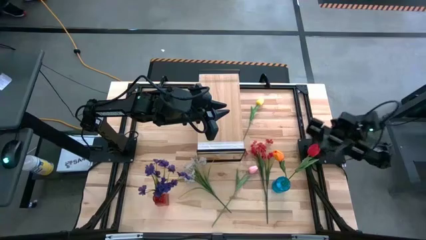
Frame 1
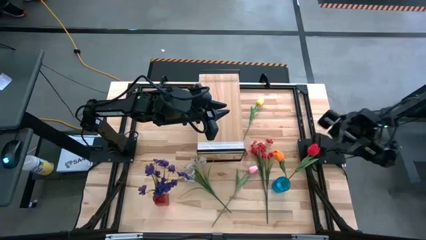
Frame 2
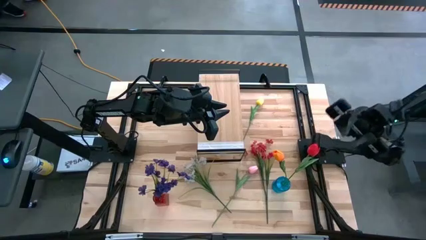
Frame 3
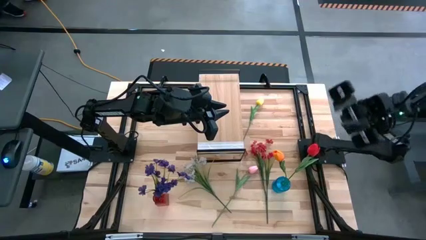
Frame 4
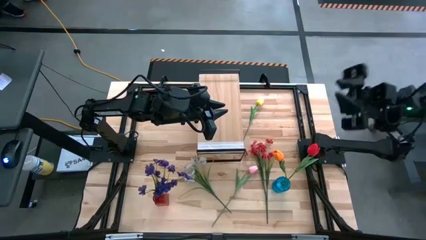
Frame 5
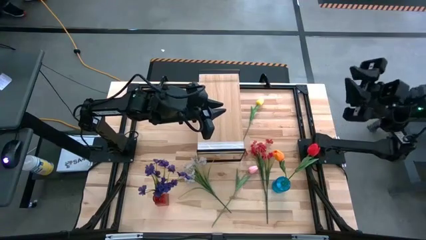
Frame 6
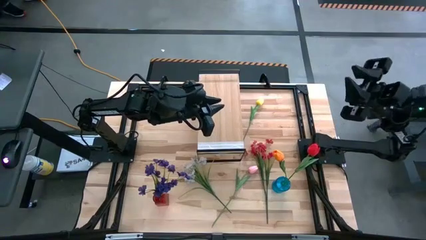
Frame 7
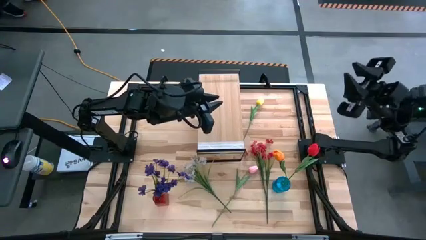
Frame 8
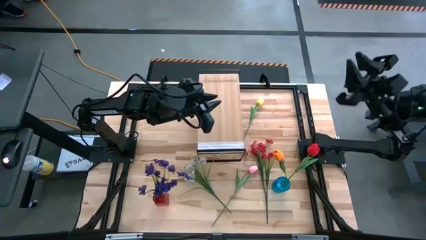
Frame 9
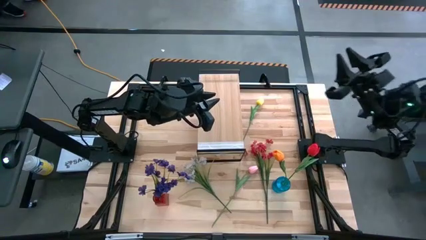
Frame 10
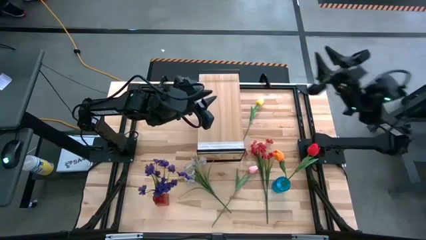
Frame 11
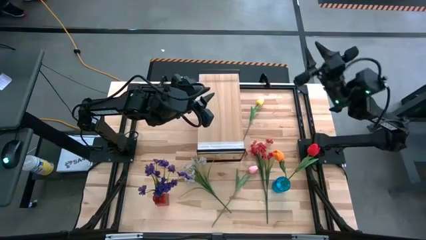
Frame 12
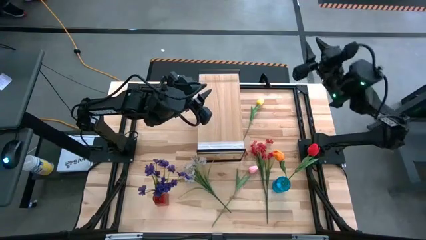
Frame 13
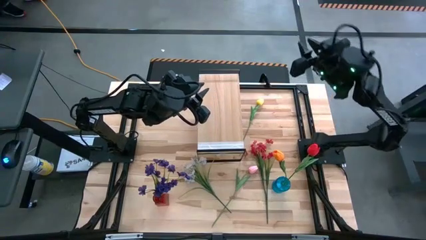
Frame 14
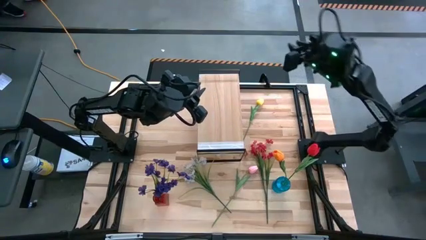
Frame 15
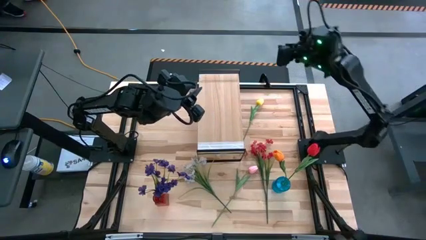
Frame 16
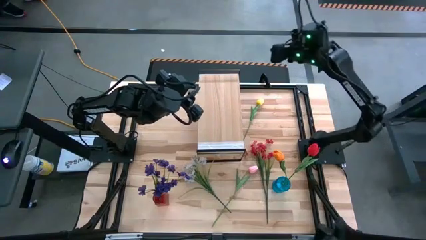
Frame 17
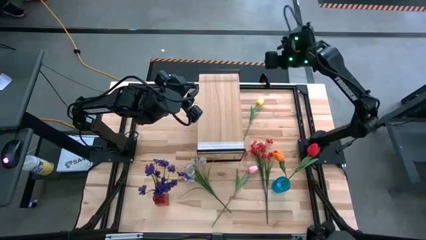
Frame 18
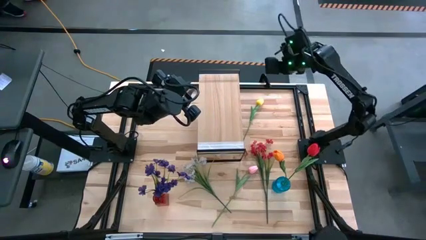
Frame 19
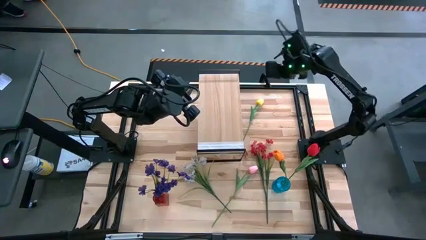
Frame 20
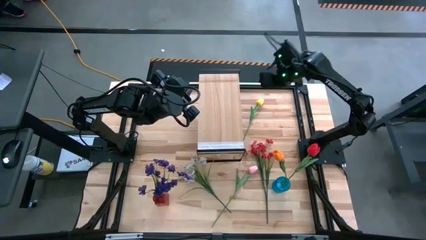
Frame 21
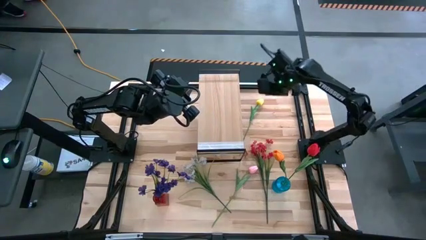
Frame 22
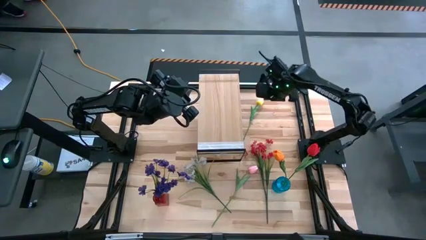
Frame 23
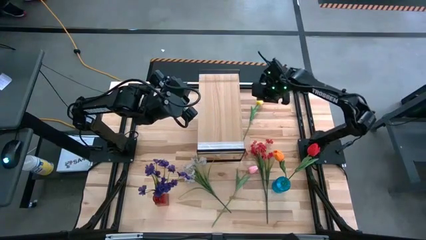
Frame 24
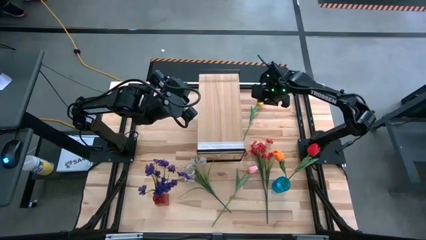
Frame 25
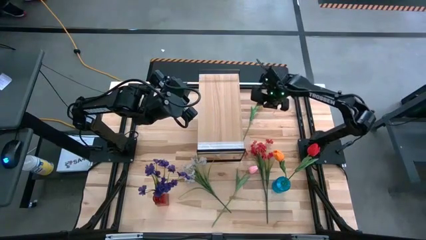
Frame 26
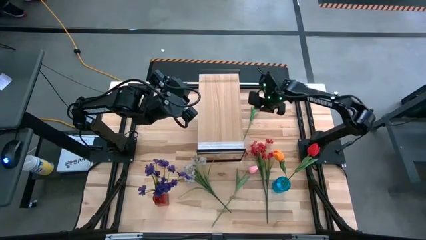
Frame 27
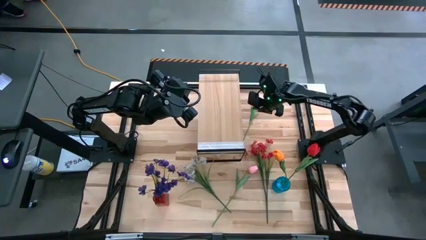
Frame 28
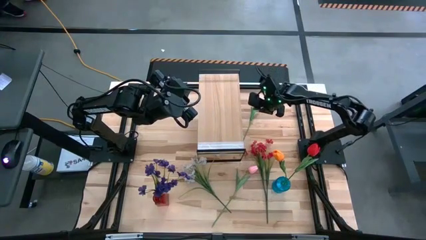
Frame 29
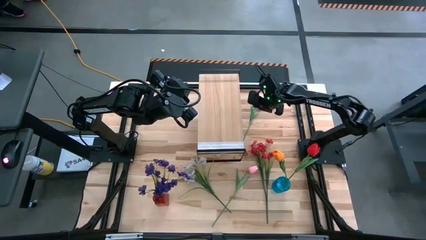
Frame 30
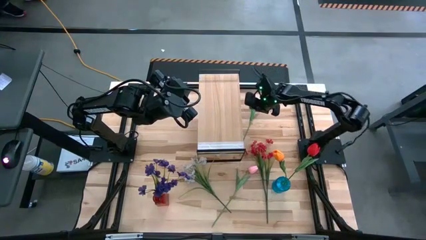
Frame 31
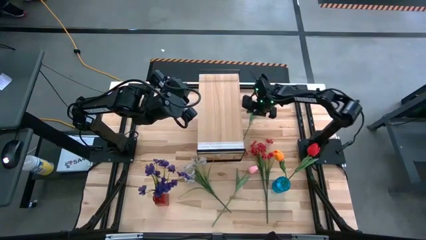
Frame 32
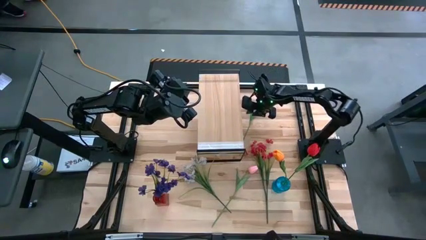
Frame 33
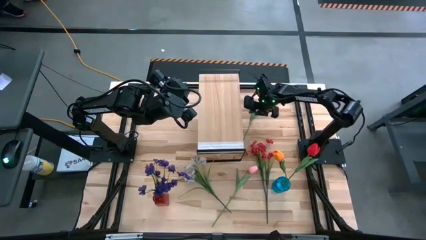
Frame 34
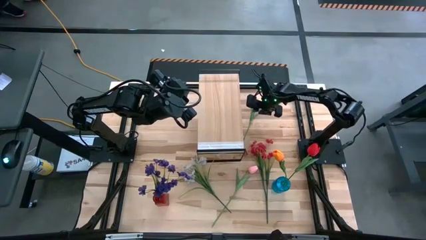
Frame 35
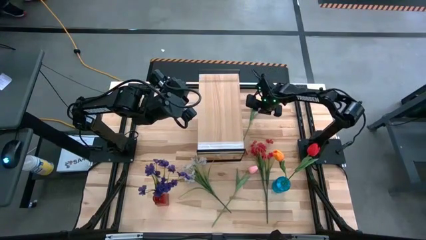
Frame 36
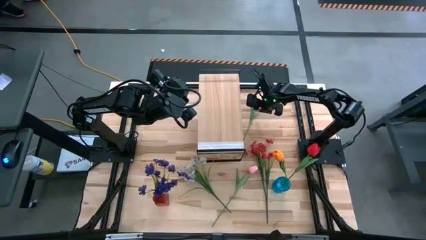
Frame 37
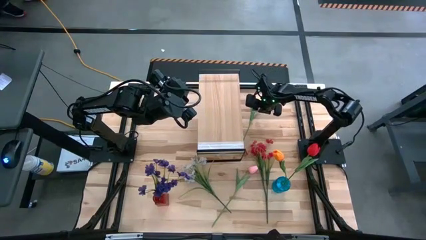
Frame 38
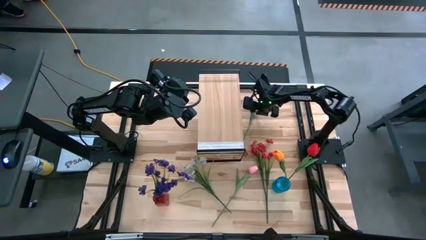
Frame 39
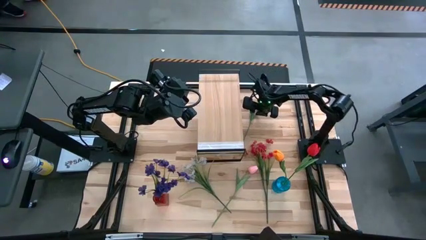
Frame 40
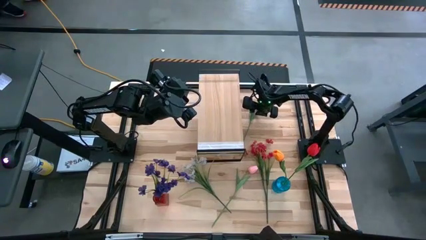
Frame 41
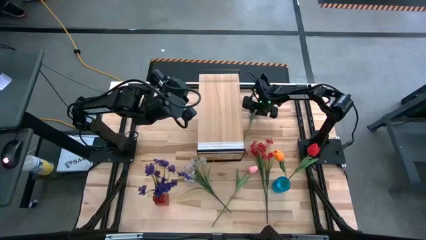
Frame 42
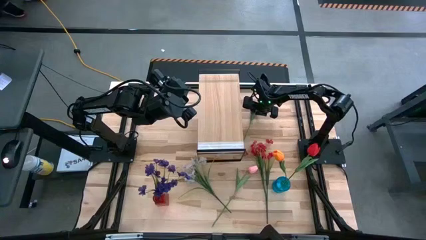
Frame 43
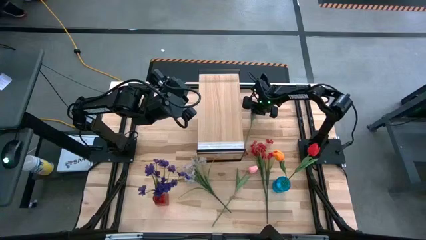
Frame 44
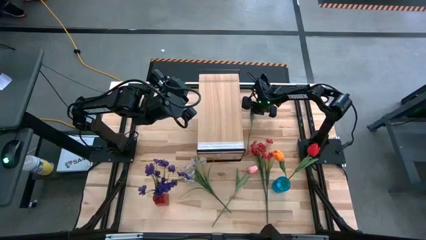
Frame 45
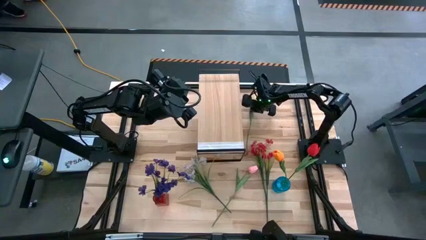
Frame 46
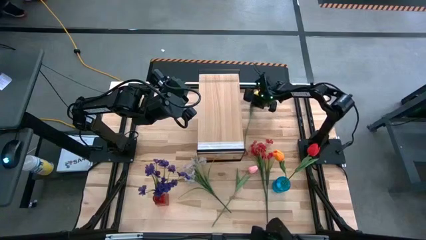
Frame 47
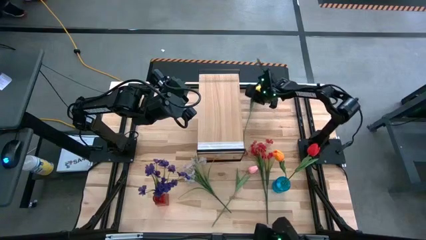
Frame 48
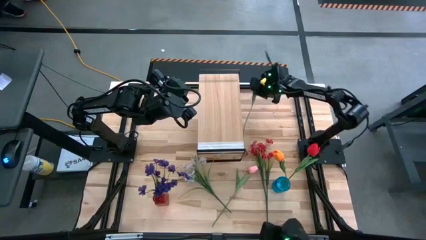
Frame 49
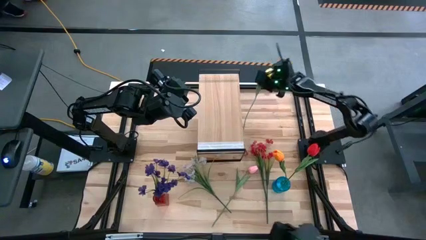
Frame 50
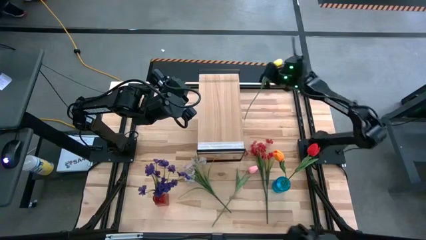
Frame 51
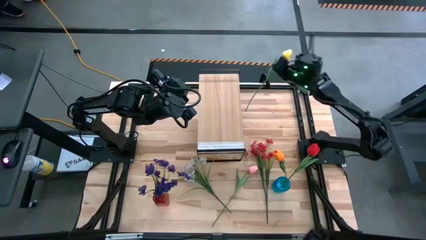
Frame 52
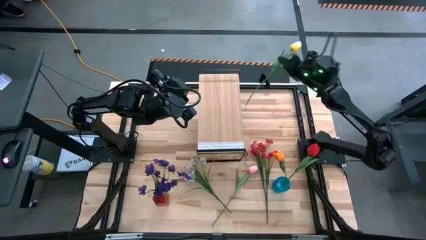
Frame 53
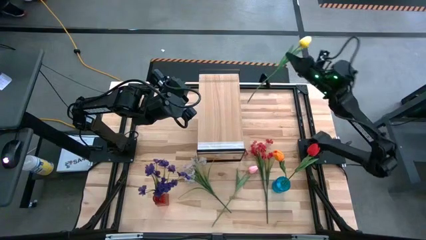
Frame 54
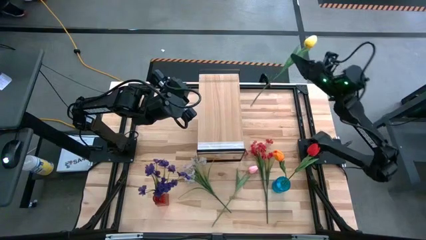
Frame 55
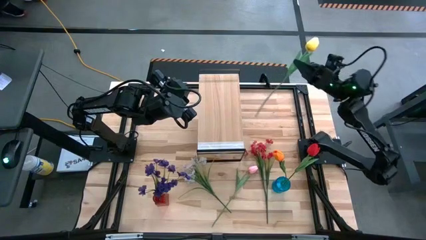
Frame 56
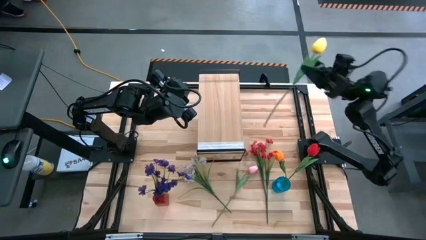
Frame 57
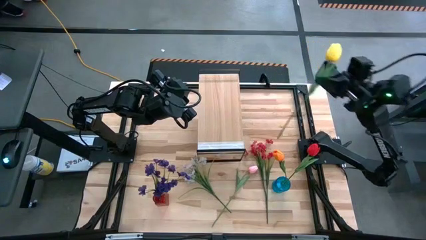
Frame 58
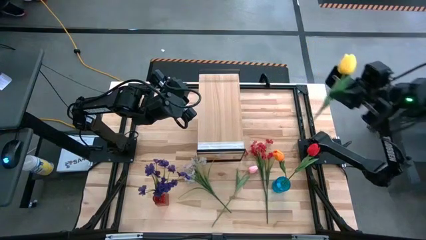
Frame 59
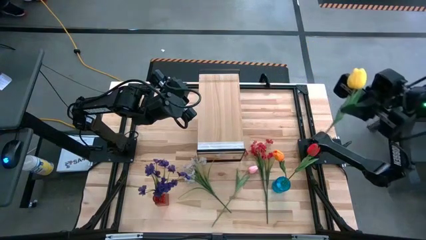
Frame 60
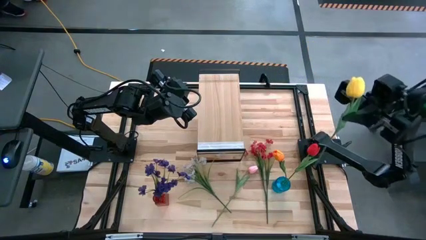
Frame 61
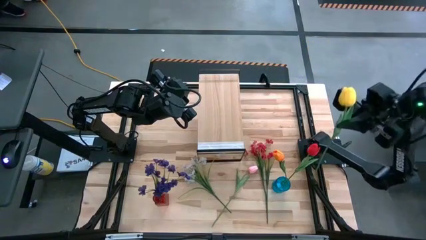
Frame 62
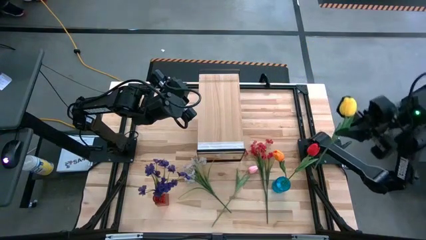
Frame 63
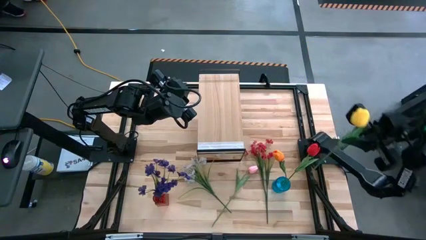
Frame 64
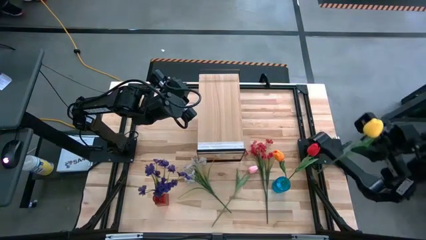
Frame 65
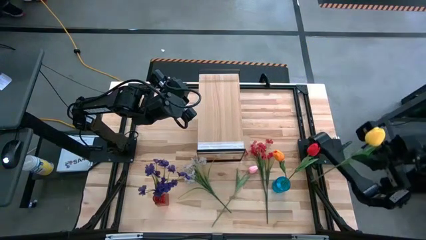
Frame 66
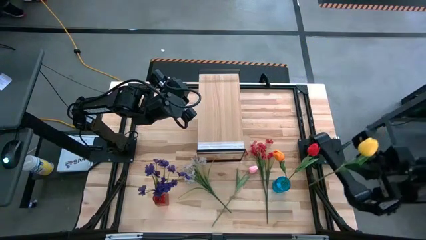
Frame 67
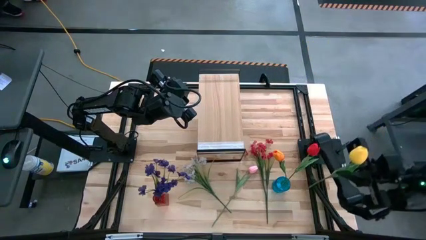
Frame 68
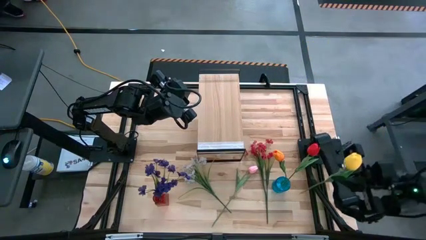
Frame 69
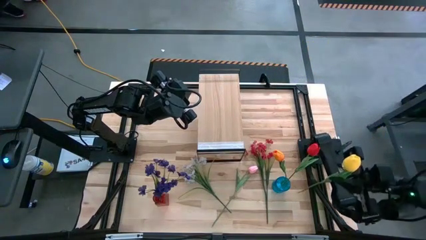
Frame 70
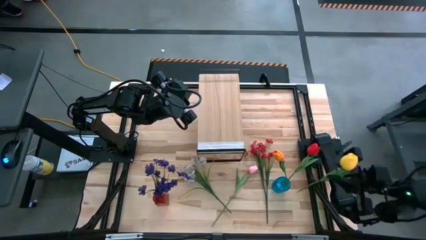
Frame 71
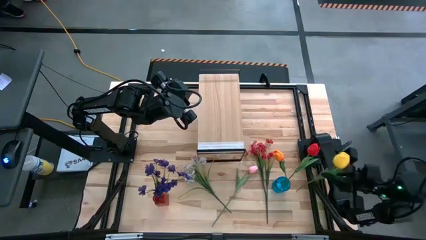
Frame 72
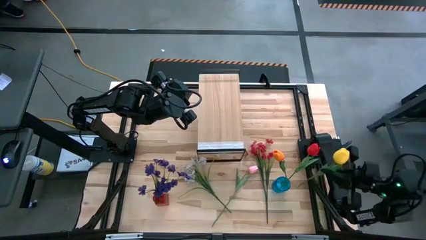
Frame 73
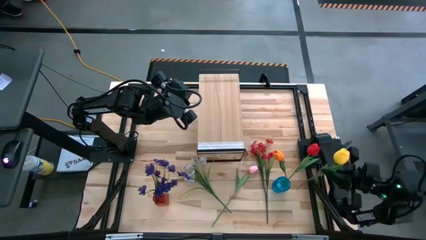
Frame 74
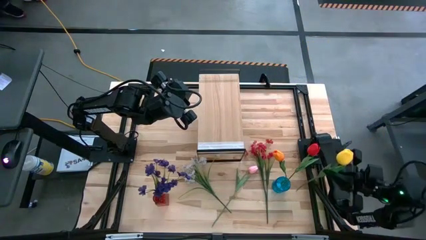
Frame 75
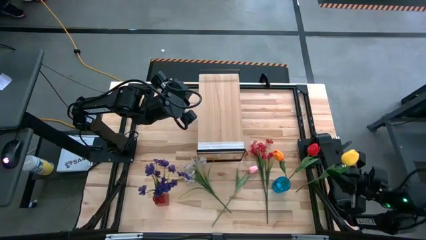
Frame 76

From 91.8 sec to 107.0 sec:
Task: Pick and place flowers into a vace then onto a shelf
Put the yellow tulip into the blue vase
